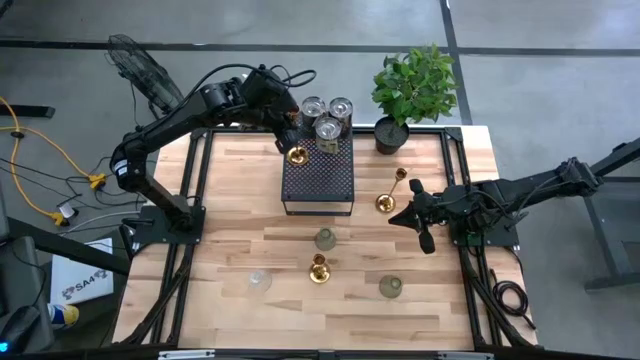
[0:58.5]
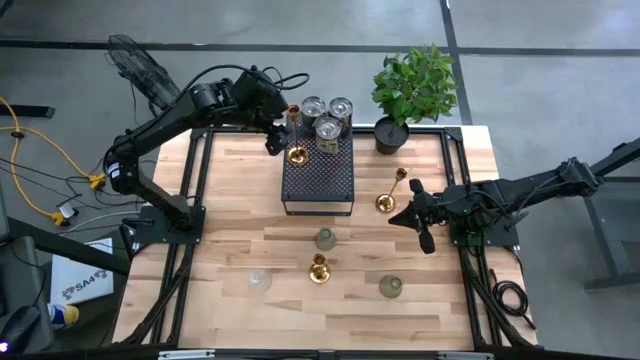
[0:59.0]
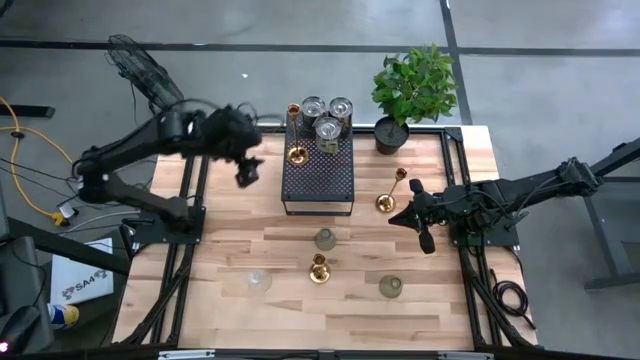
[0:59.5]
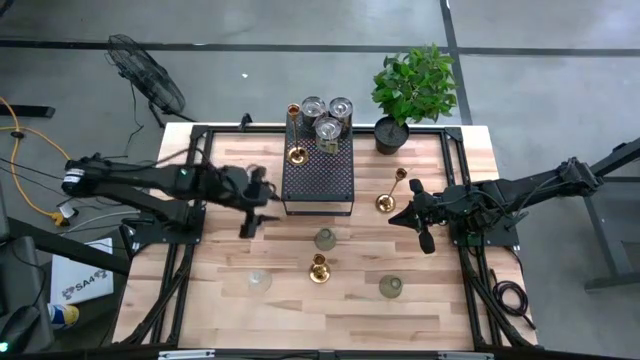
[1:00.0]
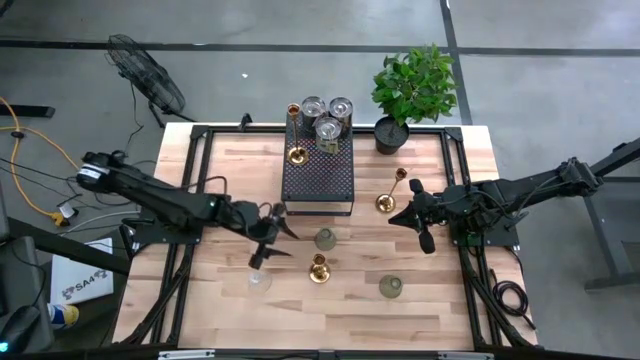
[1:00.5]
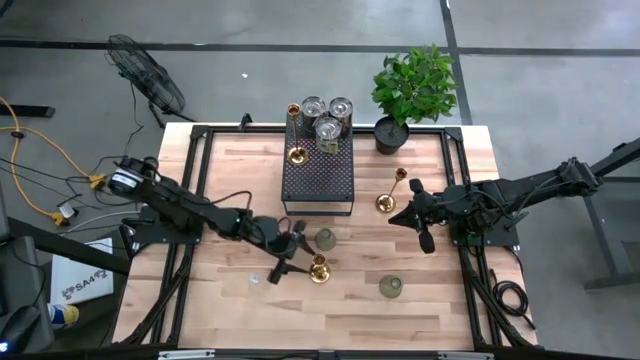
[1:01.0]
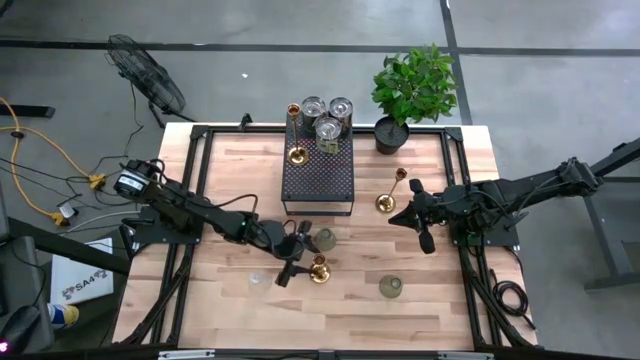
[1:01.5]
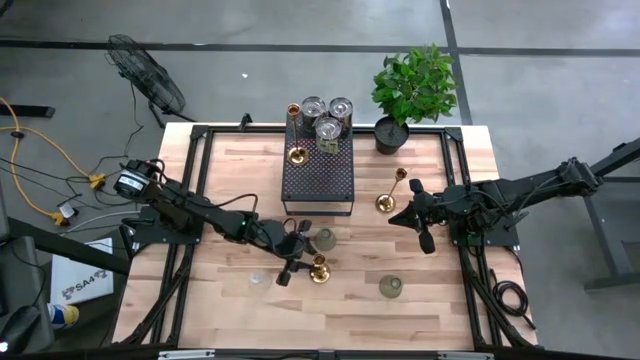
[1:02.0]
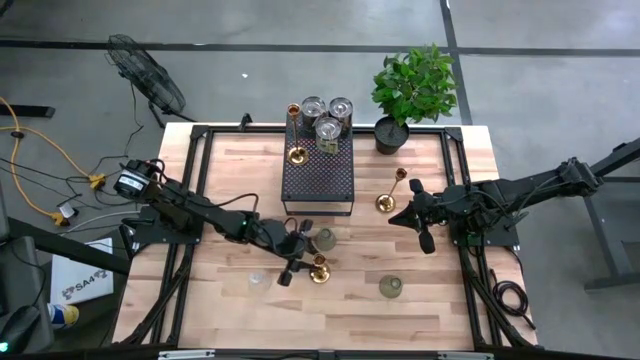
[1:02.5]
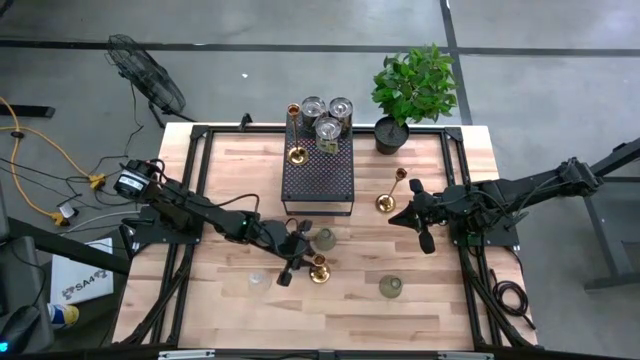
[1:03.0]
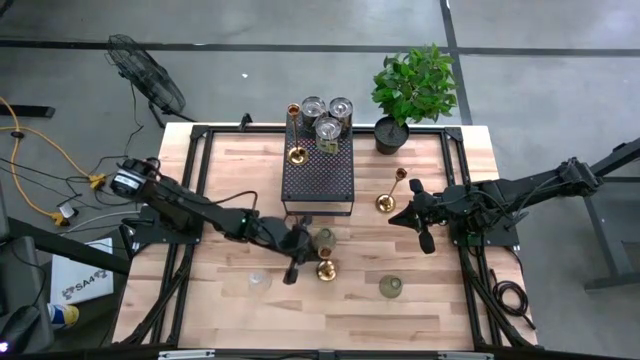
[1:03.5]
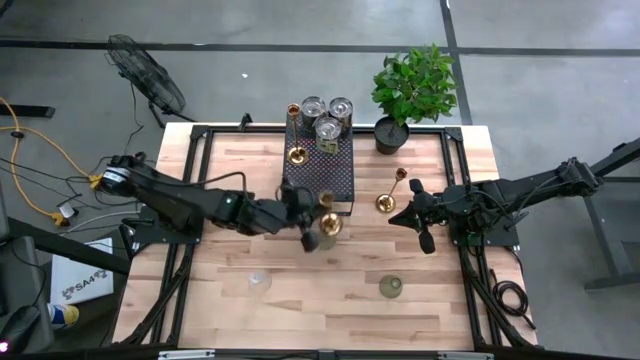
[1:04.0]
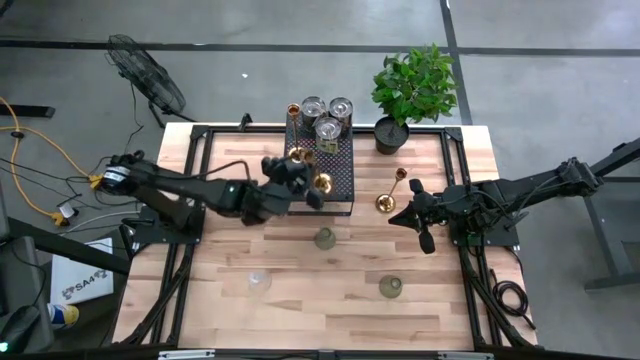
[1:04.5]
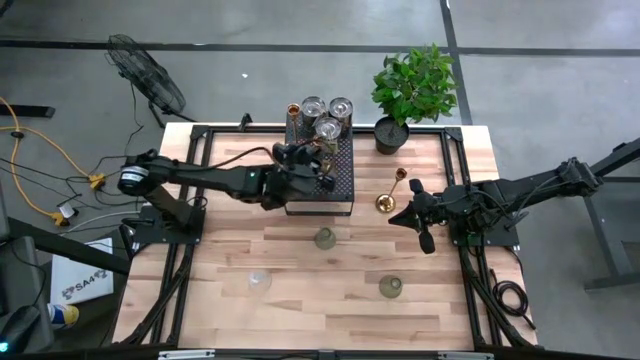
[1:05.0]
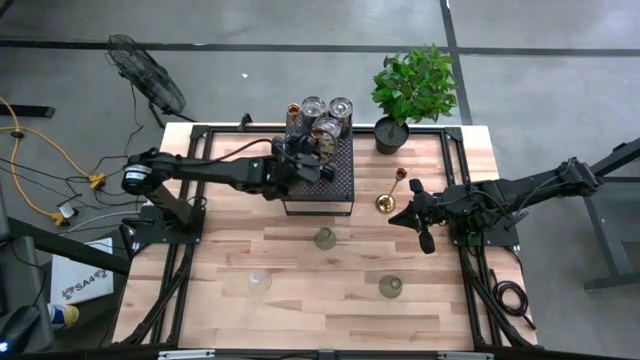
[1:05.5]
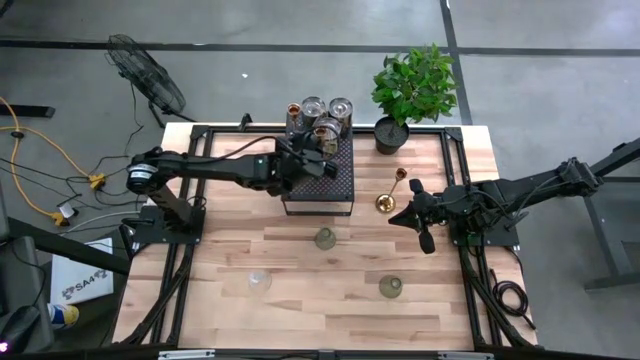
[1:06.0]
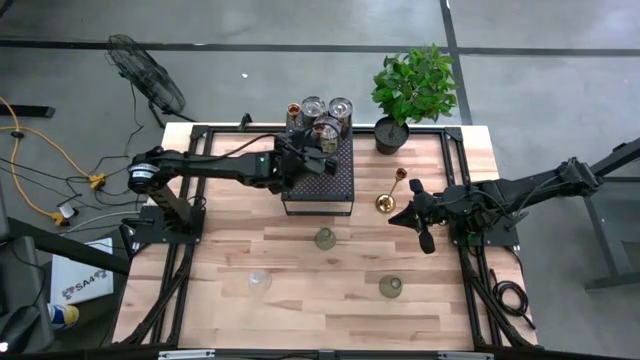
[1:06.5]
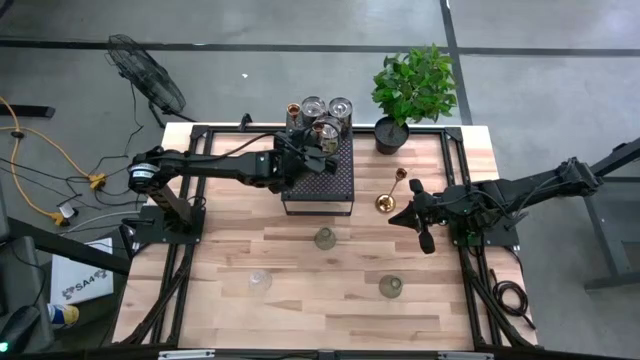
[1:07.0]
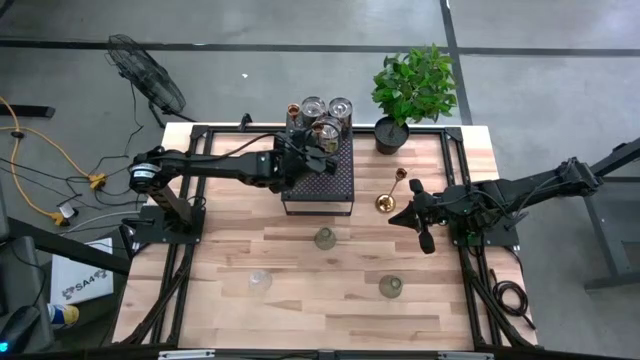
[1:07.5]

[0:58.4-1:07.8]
Task: Pick & Place candle stick holders
Put the bottom gold candle holder on the shelf

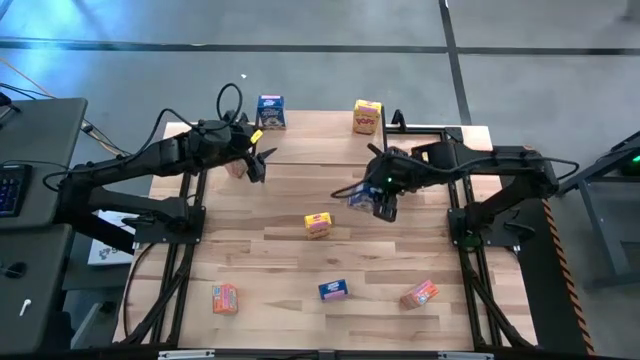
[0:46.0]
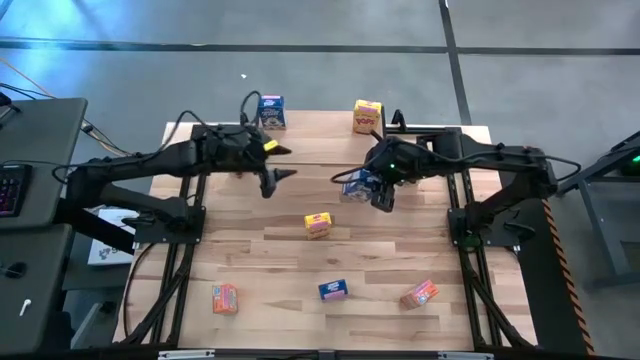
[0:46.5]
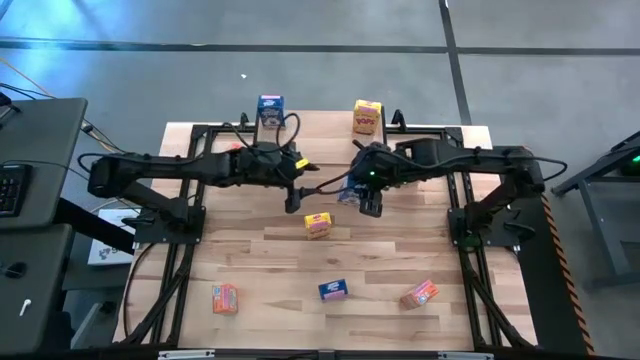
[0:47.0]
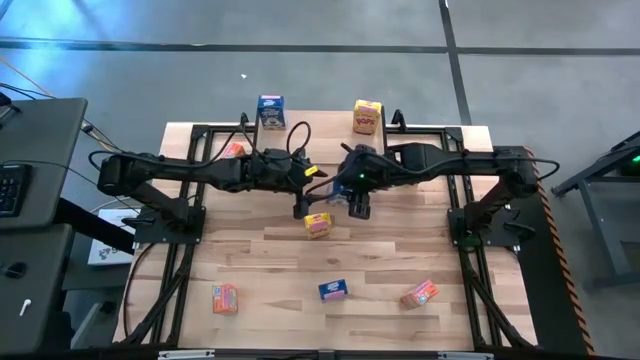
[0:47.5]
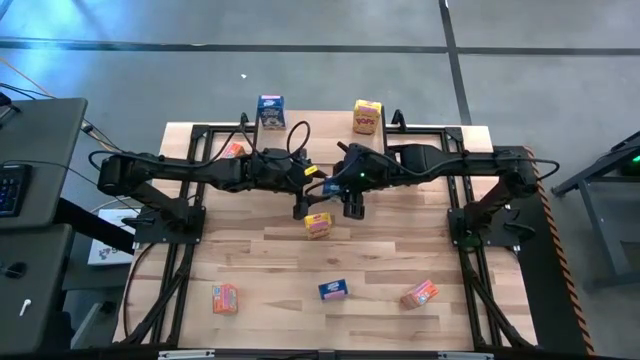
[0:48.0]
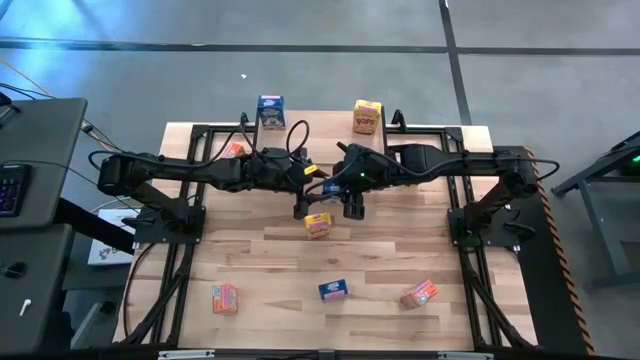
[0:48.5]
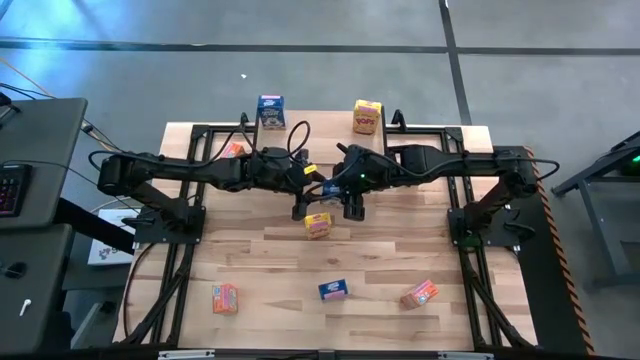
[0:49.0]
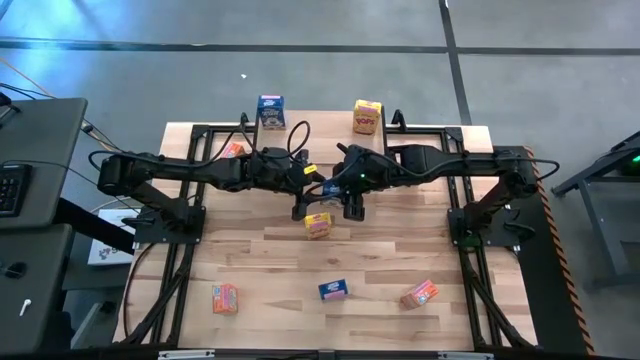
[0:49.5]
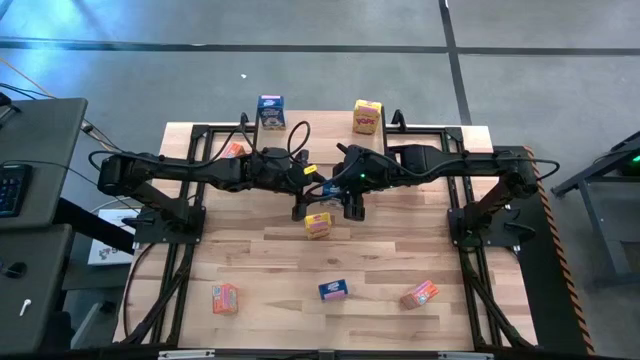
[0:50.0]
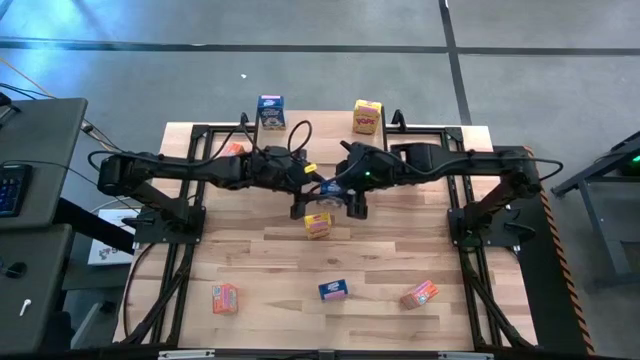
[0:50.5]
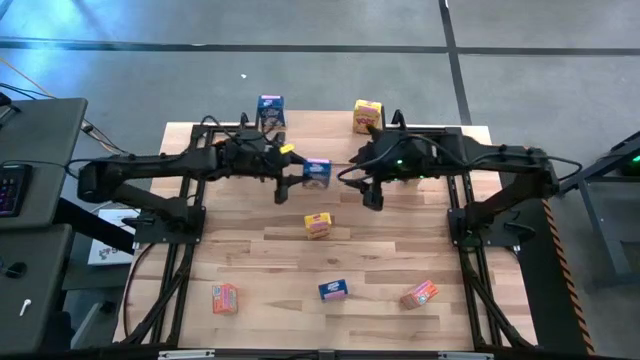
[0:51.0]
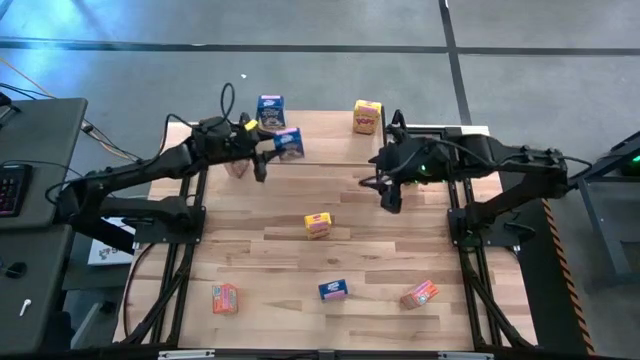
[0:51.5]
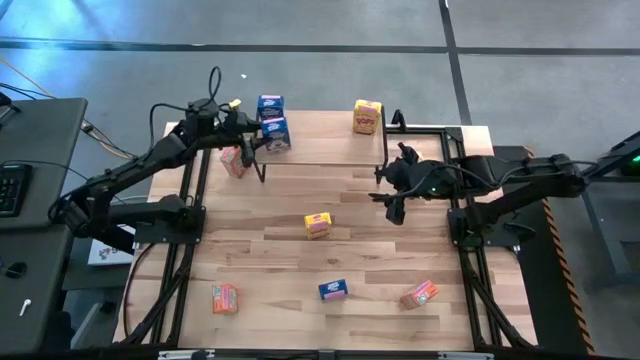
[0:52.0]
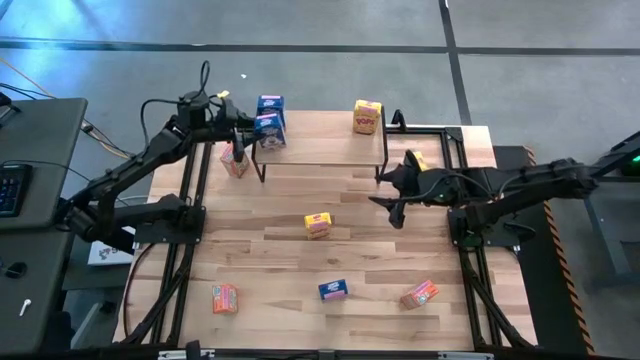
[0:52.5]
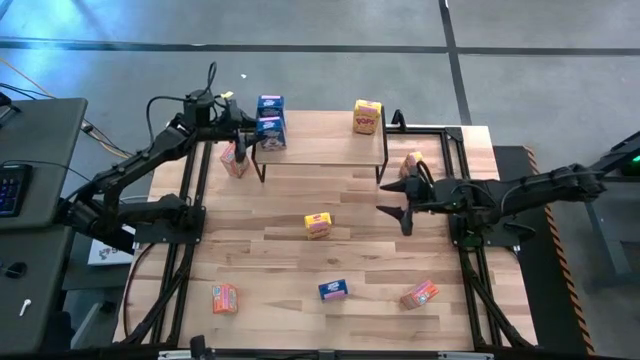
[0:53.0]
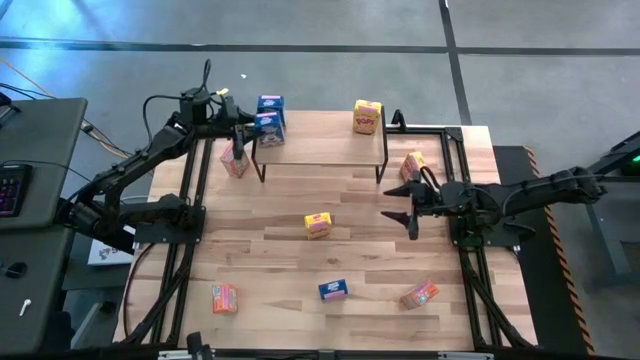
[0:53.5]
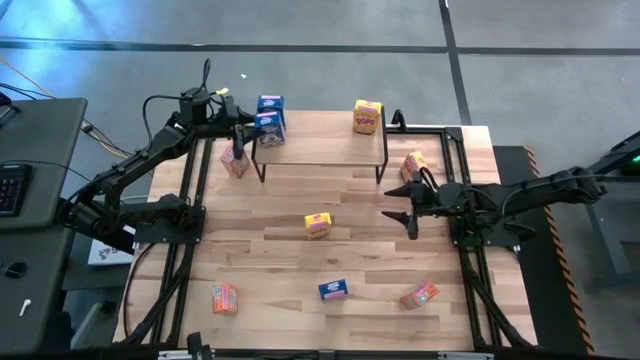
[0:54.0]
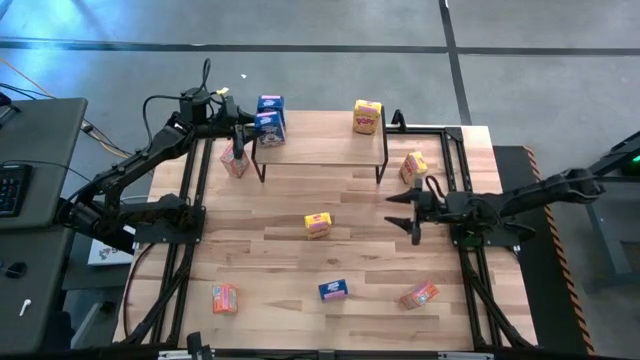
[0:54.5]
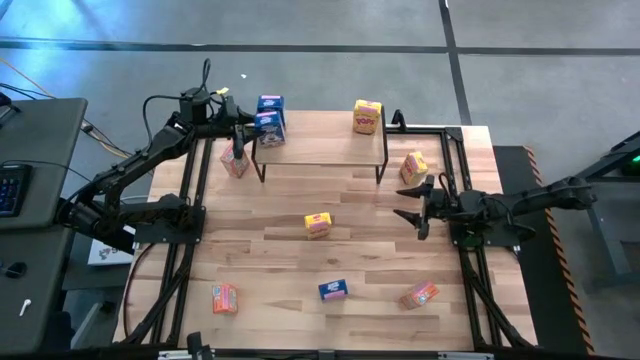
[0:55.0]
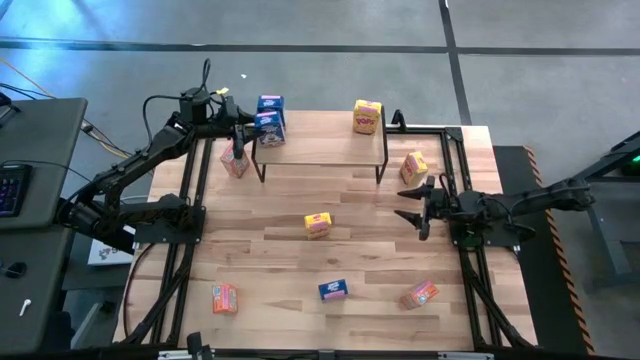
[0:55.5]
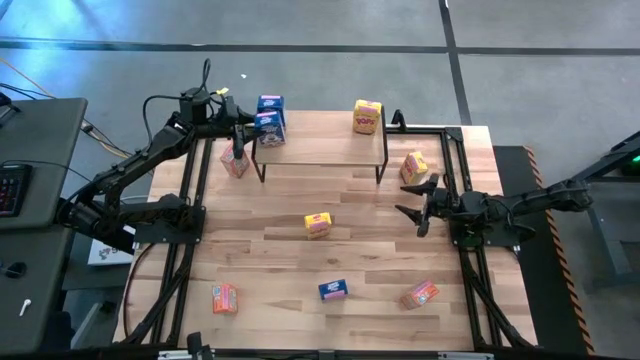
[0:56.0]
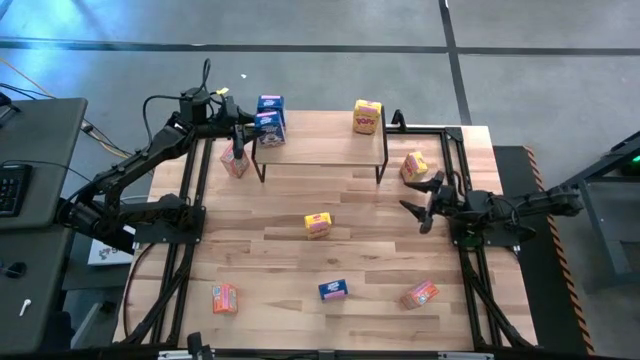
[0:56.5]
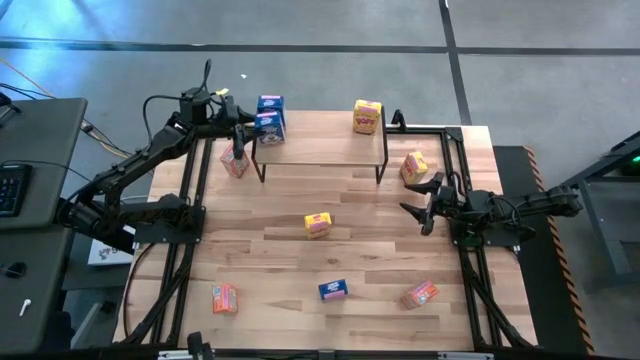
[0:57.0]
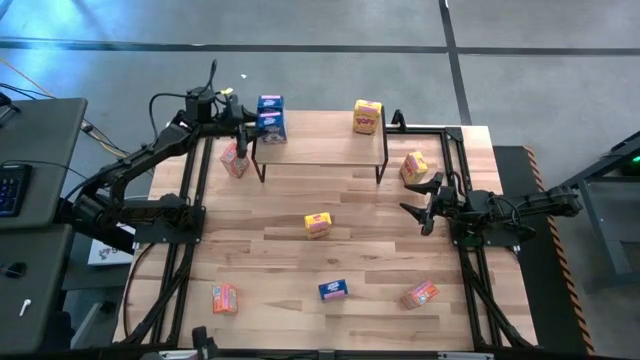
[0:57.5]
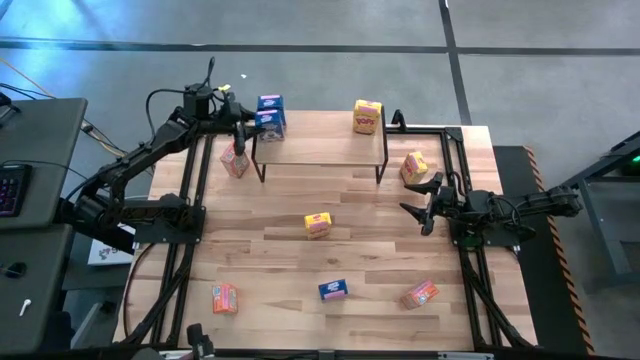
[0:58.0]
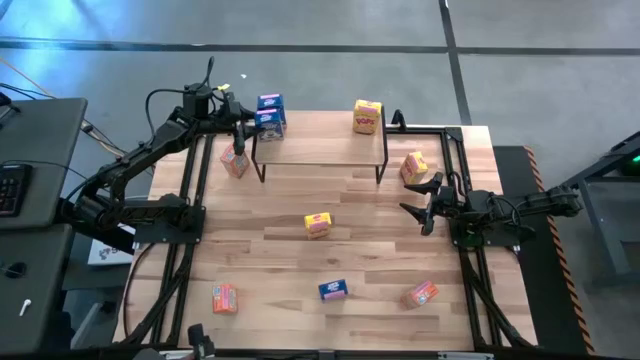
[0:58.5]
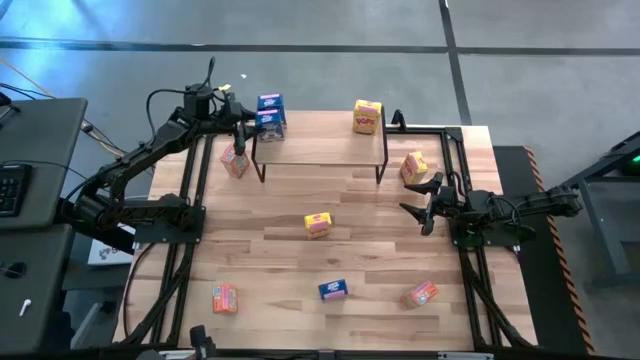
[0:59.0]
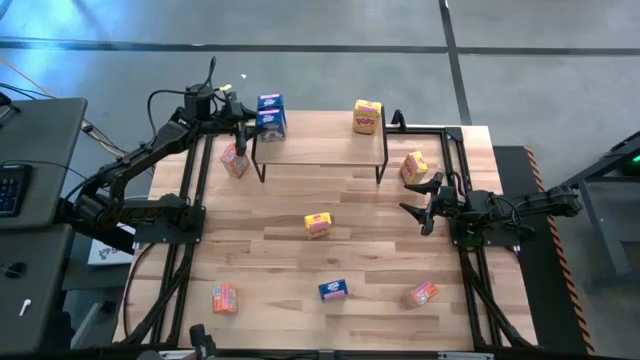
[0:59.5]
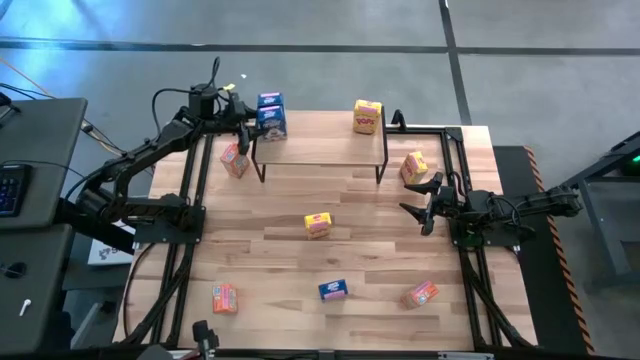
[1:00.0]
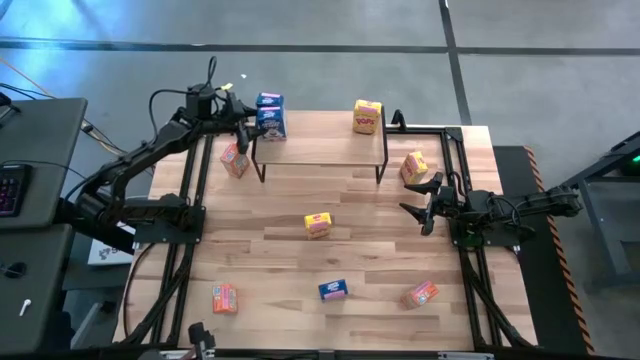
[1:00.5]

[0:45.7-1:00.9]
Task: Stack cereal on shelf
Put the top blue cereal box on the shelf aligned with the other blue cereal box
